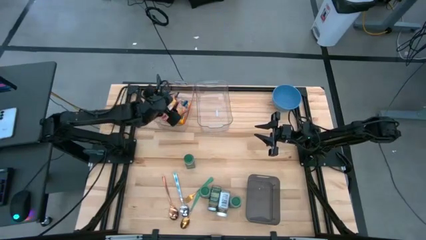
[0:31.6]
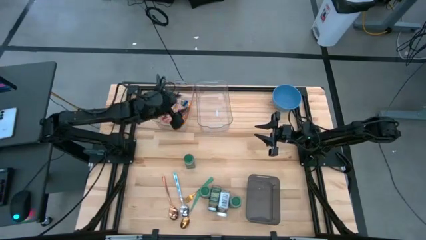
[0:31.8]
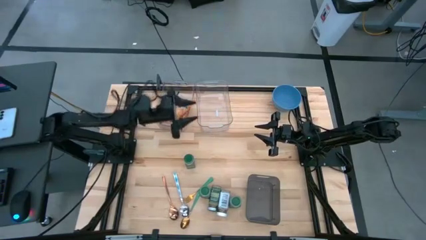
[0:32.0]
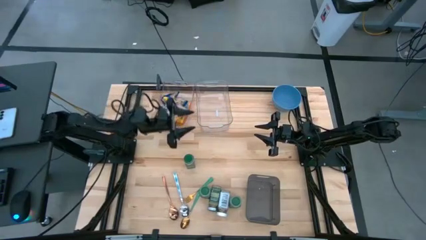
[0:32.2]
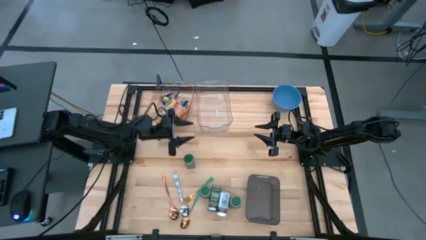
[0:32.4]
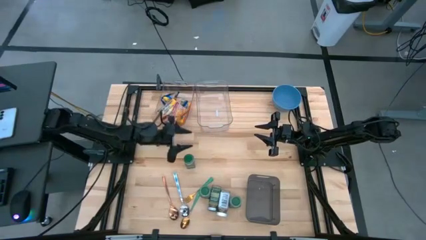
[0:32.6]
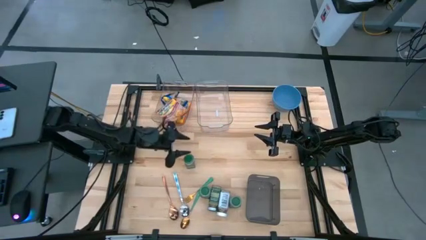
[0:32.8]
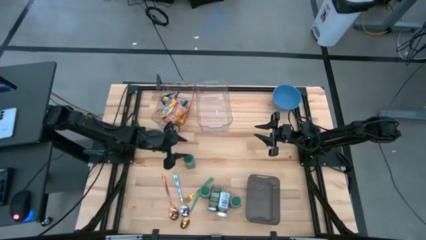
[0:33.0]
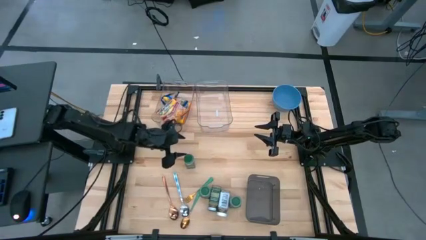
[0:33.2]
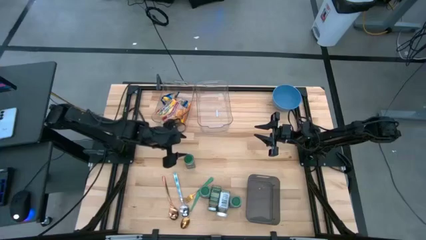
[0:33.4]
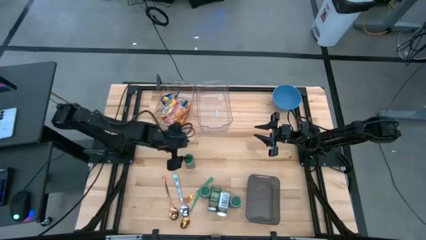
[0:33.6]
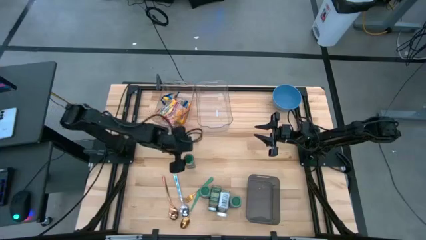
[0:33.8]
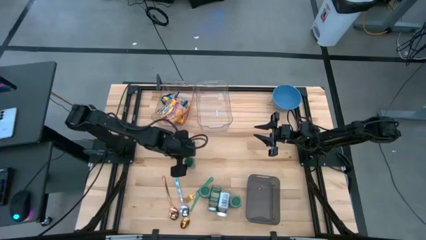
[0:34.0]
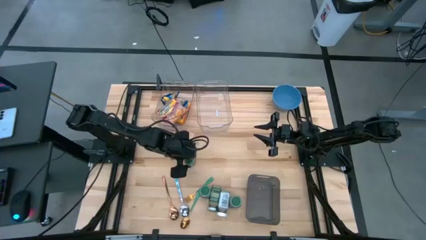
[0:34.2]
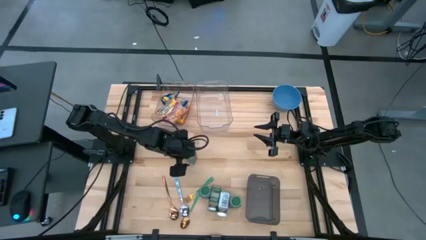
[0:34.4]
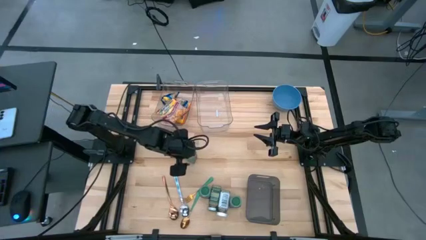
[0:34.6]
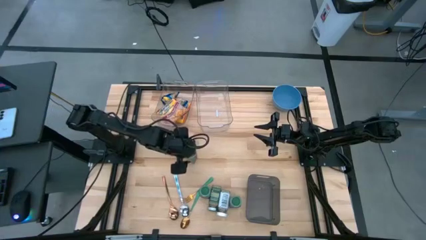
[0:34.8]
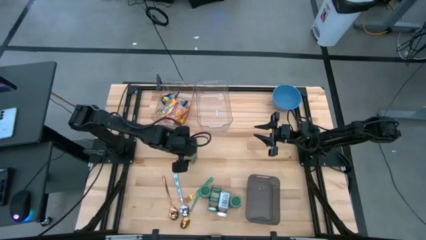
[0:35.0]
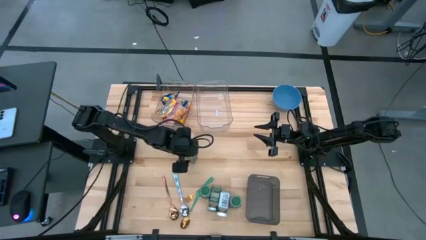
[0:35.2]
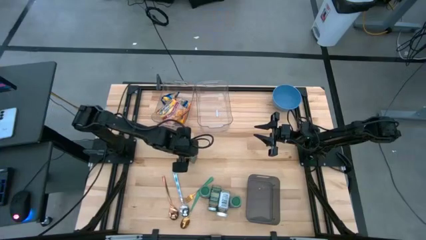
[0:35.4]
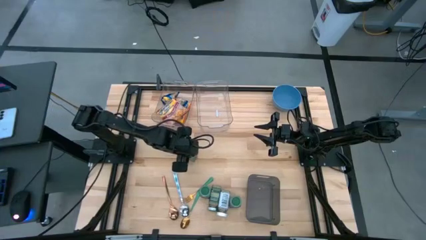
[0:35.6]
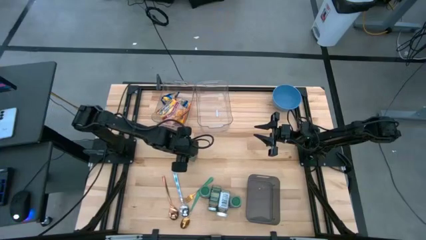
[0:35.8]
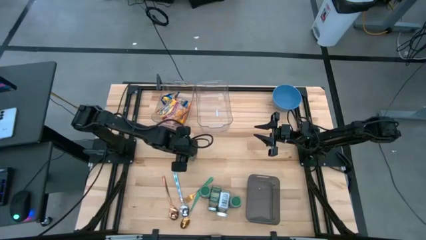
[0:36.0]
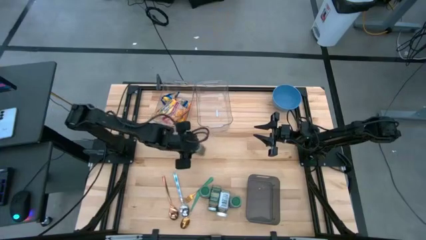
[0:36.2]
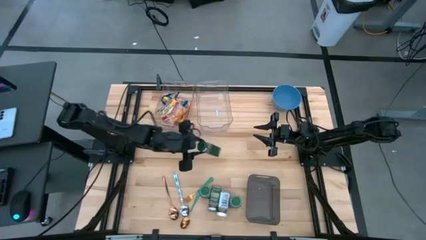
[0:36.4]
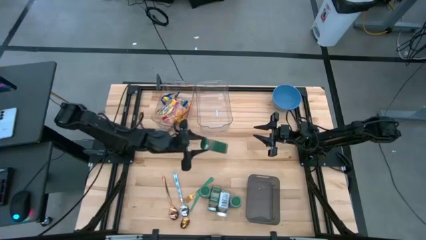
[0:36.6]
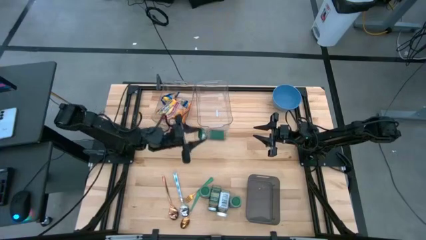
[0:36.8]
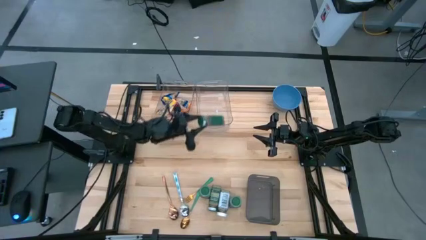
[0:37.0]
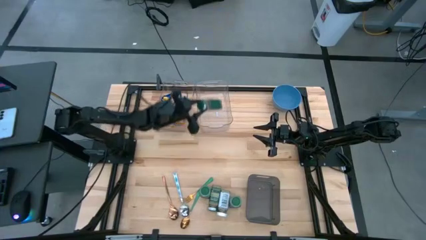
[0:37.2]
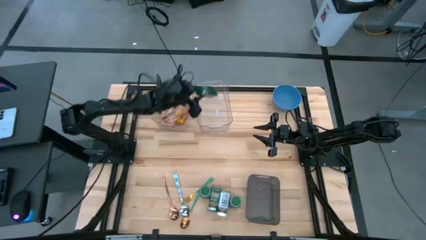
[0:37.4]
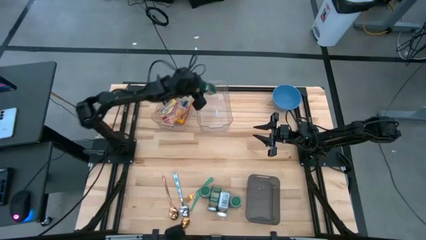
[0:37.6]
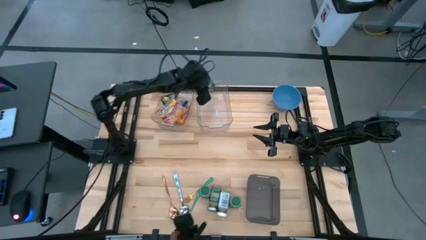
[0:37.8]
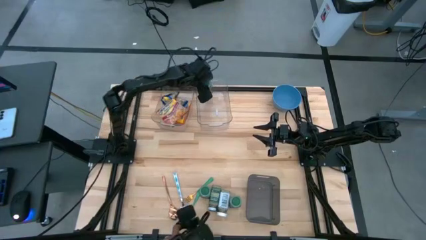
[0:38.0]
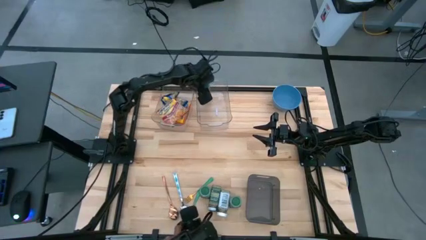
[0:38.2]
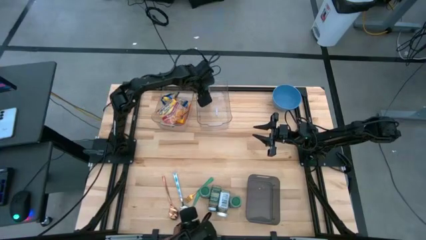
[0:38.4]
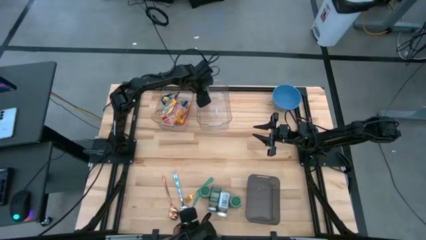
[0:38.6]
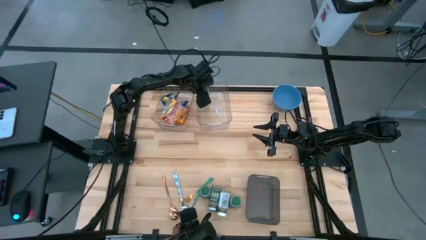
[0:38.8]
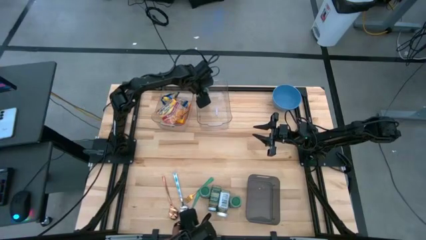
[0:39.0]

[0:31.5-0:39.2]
Put the green spice bottle into the right transparent bin

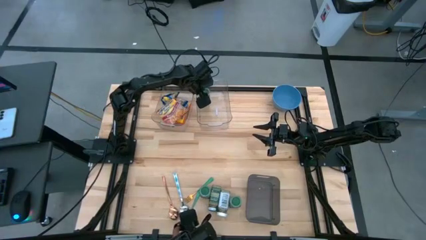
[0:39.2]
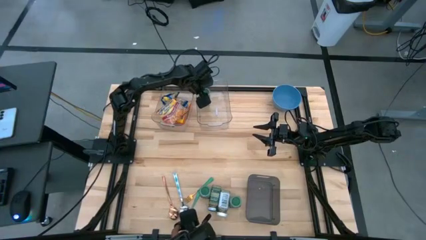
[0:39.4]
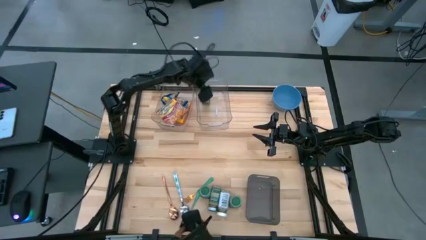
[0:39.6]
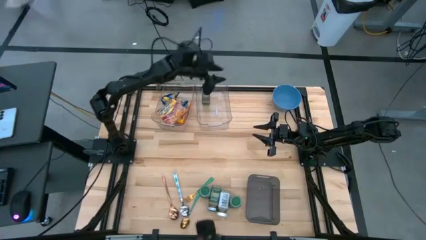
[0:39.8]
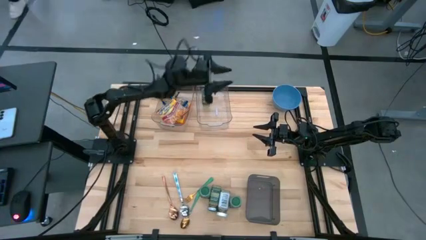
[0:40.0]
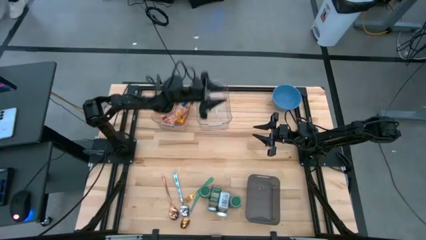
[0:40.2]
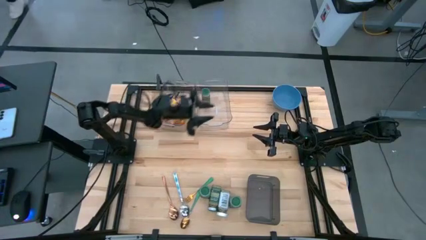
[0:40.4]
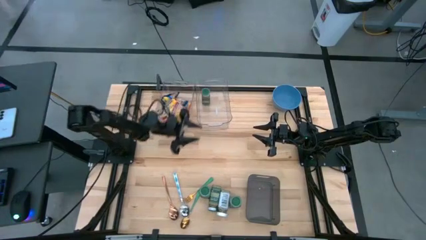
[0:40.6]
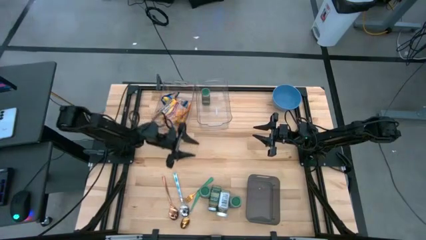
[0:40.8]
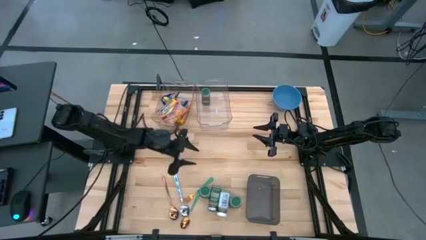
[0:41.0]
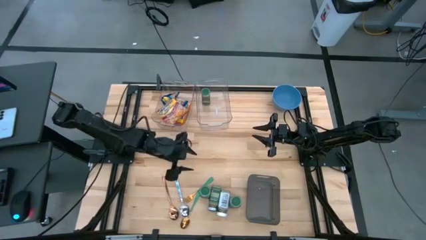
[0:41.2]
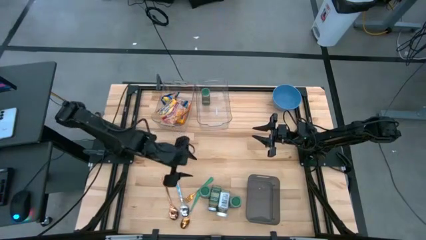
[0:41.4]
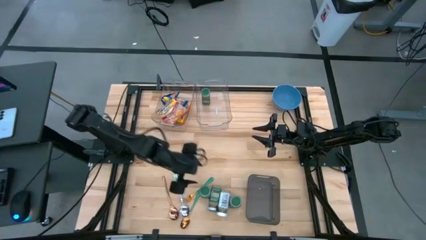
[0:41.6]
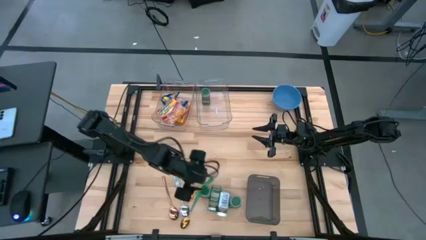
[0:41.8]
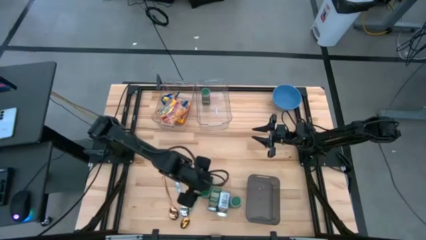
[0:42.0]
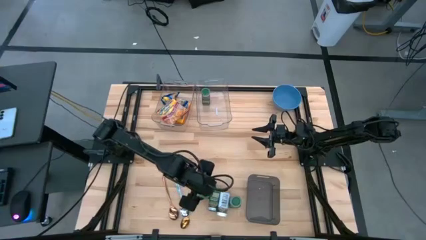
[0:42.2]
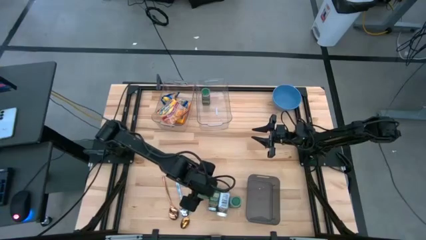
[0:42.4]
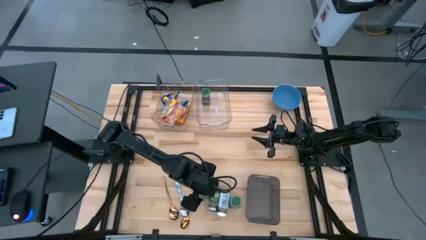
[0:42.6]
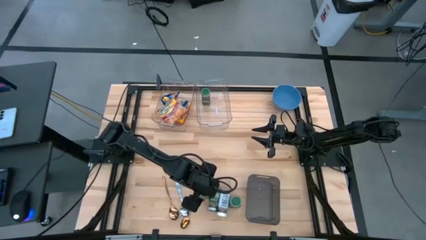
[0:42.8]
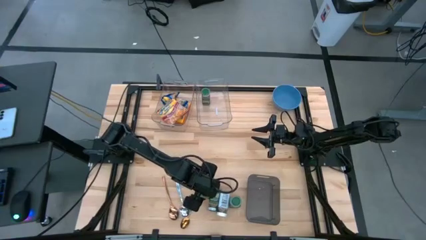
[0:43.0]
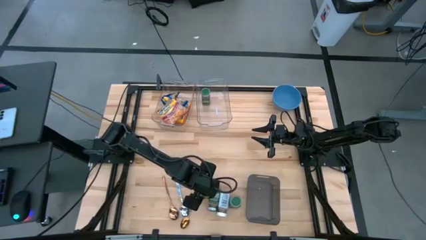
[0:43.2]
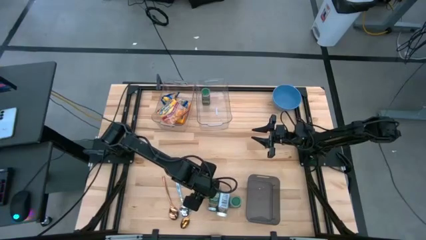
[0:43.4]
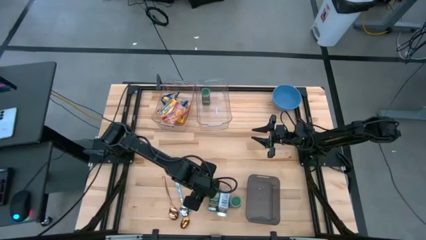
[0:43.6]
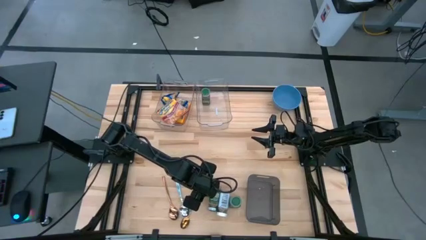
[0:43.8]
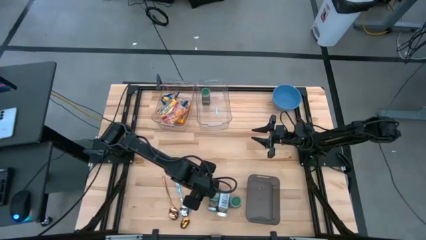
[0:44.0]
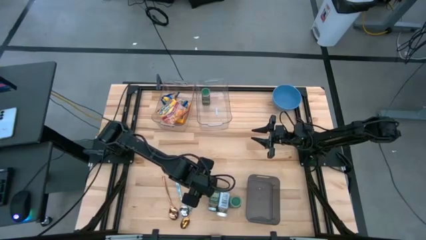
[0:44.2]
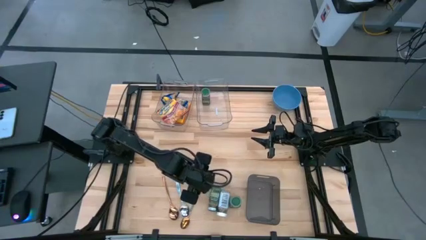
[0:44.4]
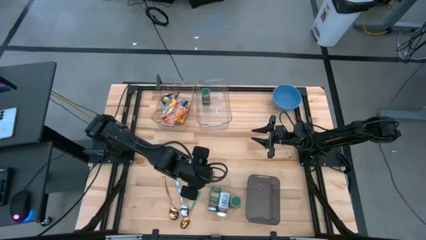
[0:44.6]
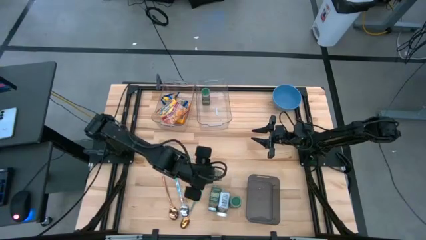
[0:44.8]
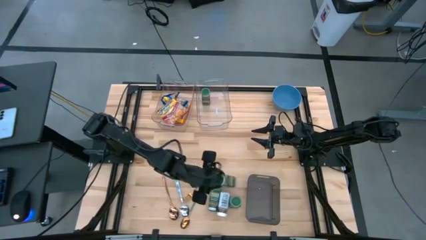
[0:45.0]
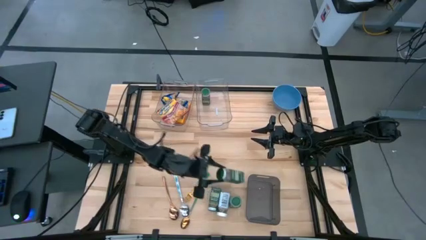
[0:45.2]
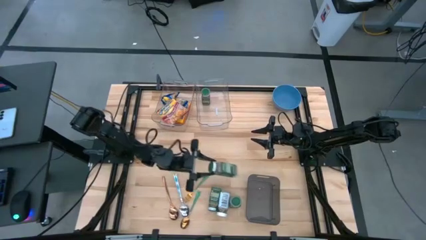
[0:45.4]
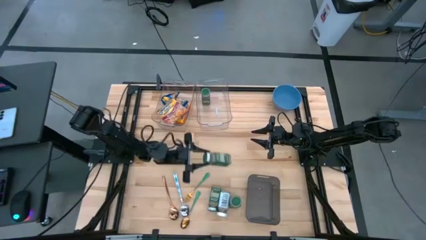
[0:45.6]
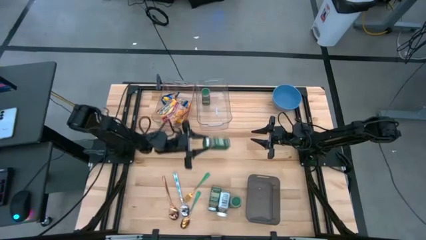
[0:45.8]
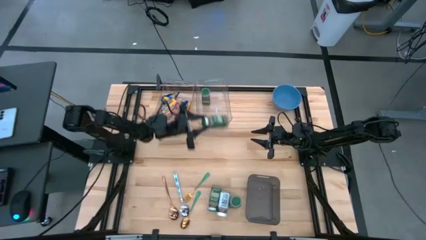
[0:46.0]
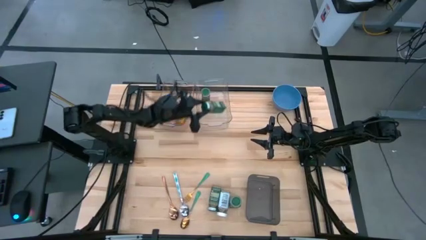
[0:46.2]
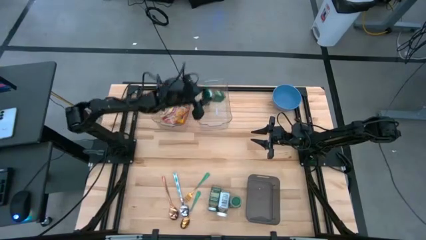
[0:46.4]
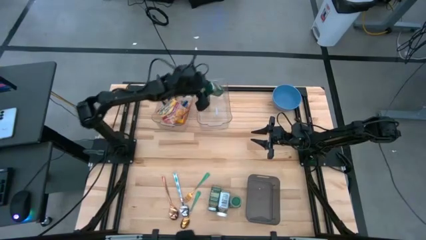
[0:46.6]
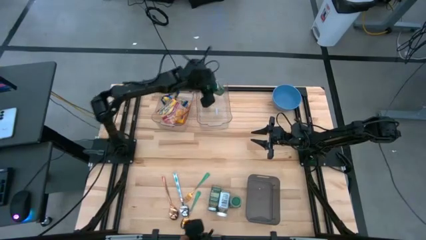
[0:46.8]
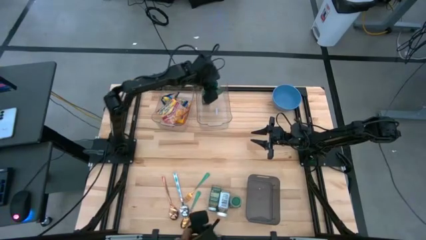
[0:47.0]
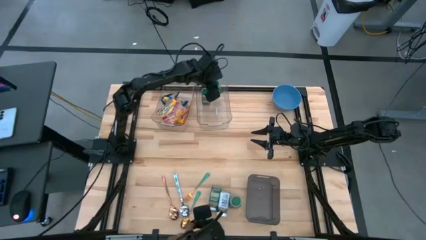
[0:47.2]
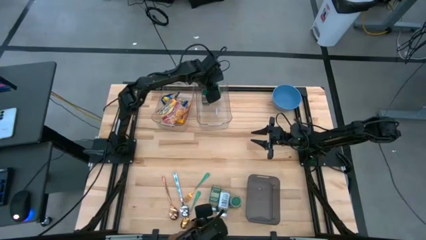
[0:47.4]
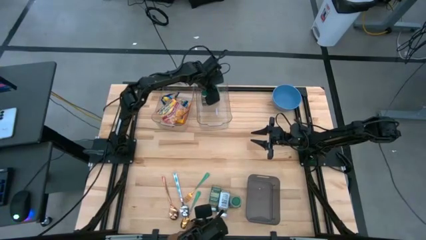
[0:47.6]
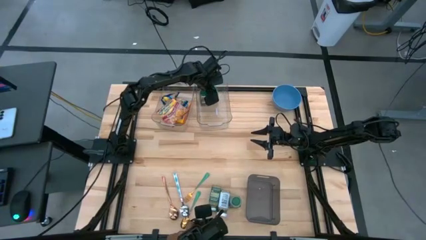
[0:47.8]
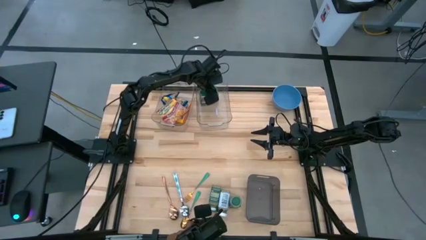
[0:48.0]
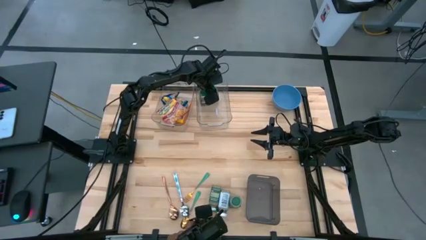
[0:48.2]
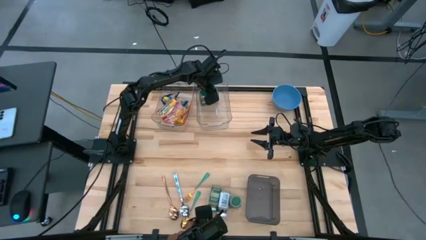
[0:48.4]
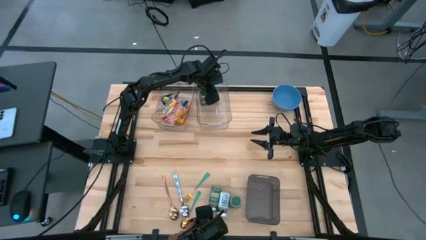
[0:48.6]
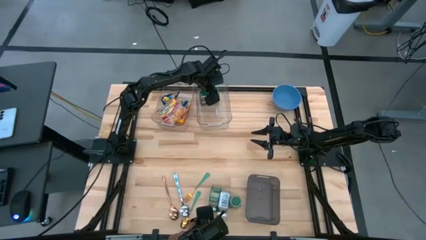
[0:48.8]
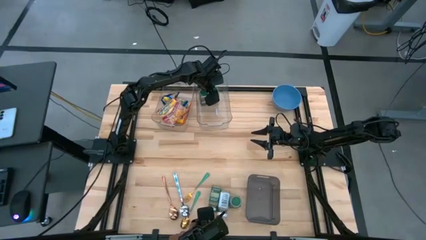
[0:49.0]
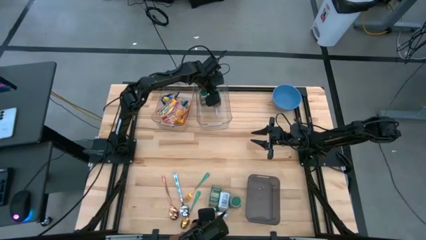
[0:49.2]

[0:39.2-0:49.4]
Put the left green spice bottle into the right transparent bin
